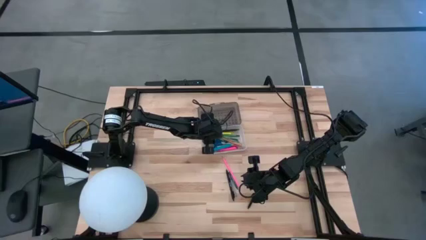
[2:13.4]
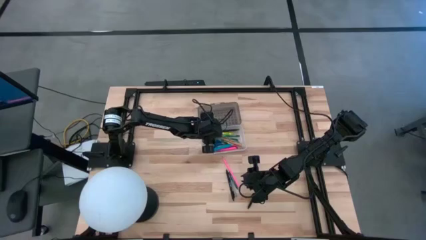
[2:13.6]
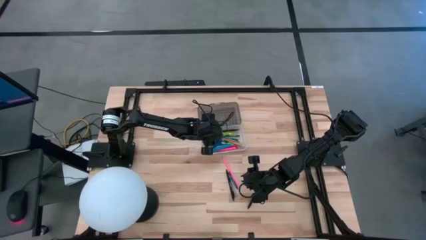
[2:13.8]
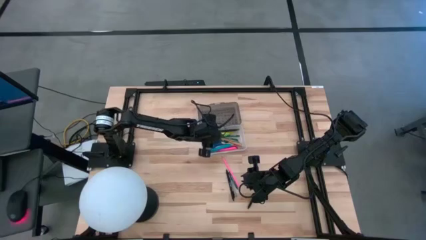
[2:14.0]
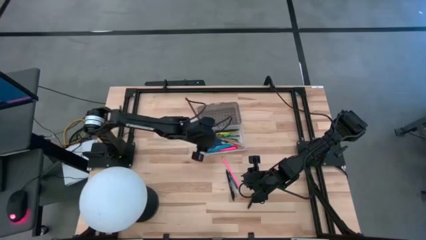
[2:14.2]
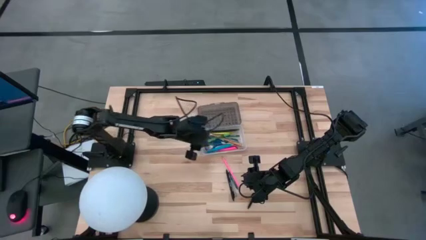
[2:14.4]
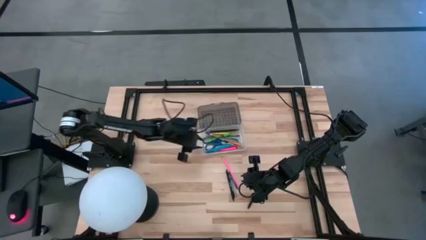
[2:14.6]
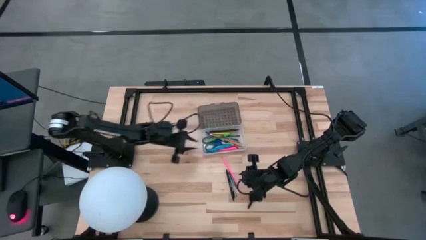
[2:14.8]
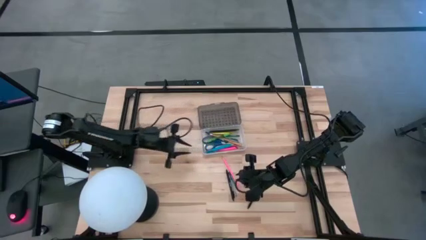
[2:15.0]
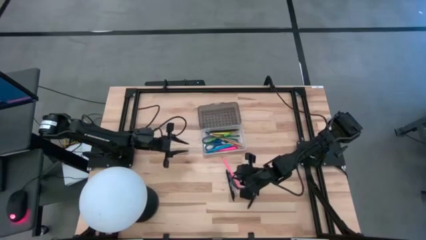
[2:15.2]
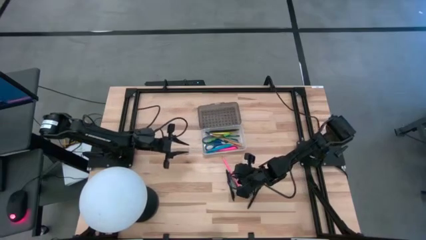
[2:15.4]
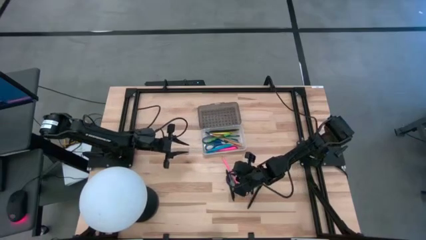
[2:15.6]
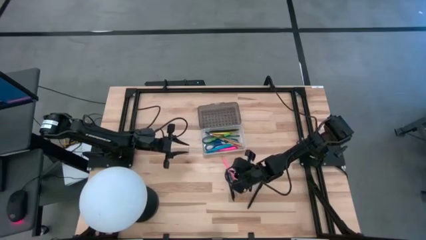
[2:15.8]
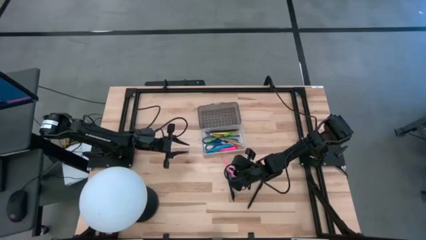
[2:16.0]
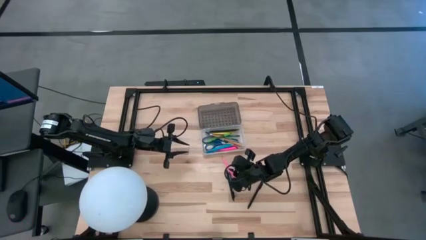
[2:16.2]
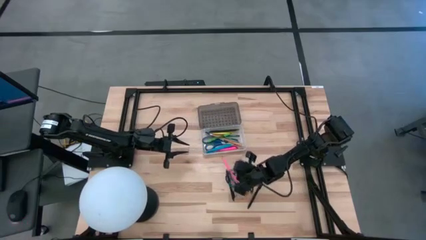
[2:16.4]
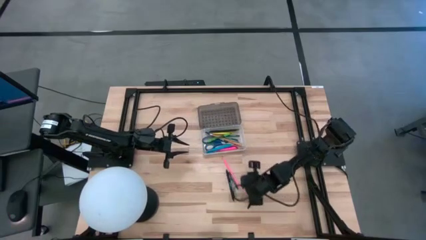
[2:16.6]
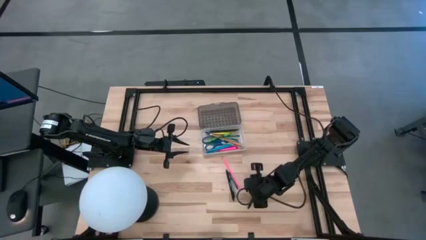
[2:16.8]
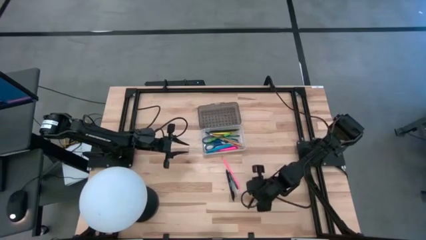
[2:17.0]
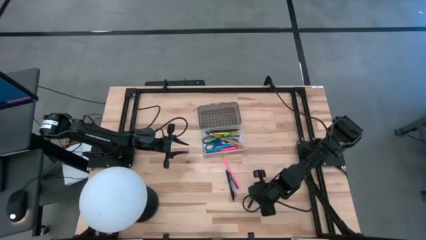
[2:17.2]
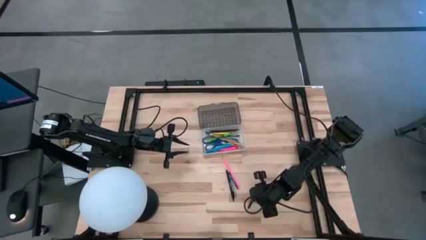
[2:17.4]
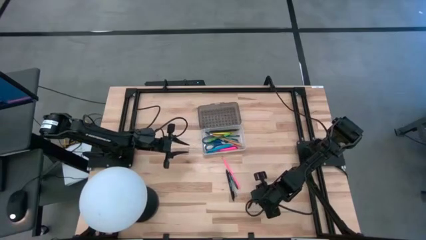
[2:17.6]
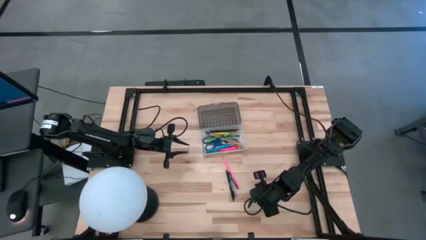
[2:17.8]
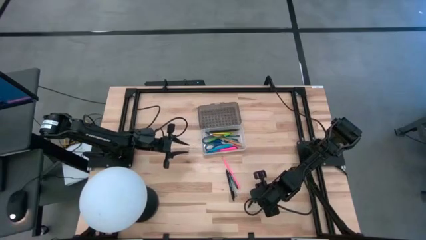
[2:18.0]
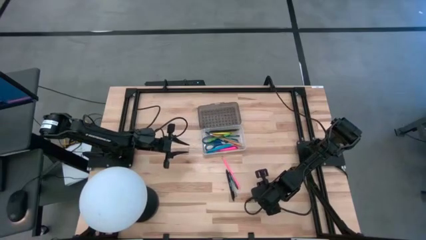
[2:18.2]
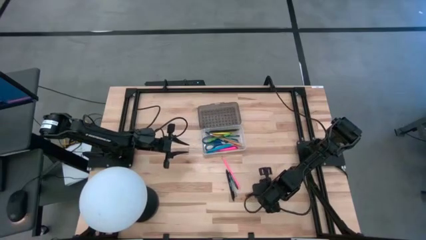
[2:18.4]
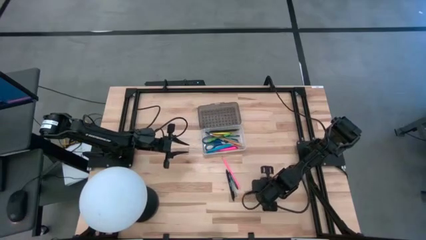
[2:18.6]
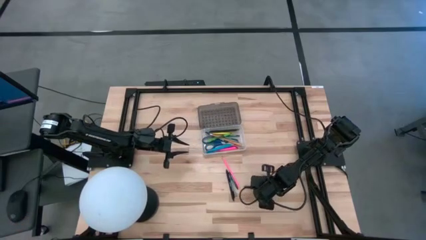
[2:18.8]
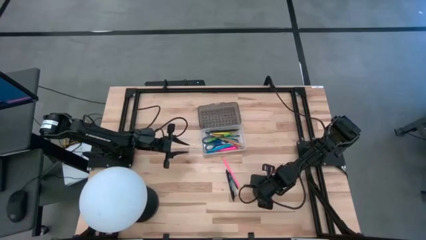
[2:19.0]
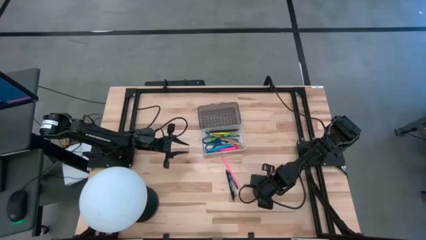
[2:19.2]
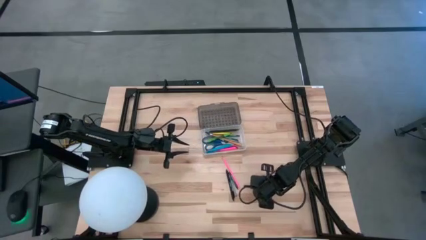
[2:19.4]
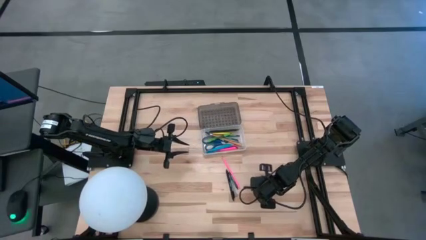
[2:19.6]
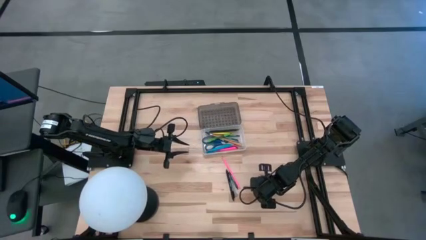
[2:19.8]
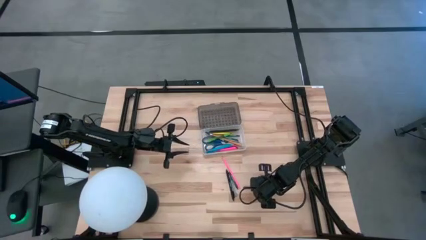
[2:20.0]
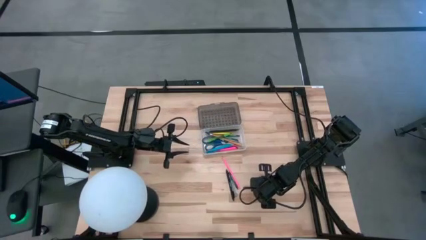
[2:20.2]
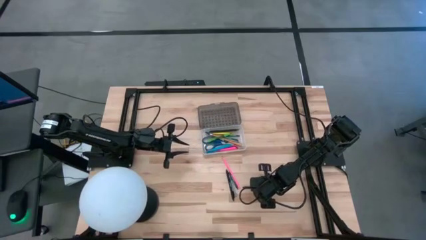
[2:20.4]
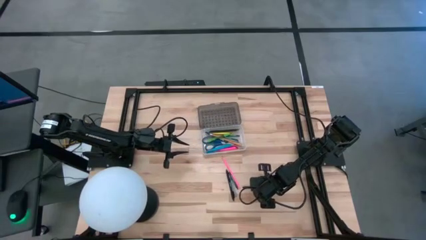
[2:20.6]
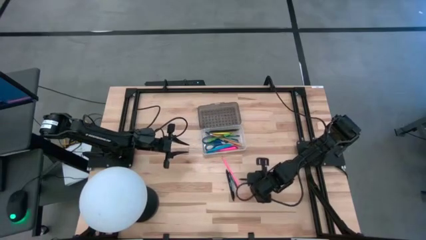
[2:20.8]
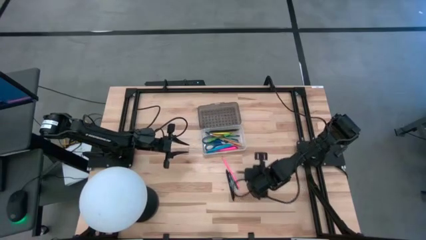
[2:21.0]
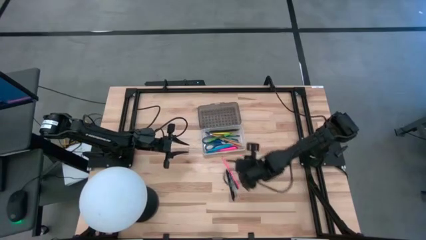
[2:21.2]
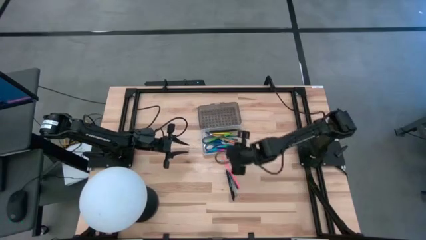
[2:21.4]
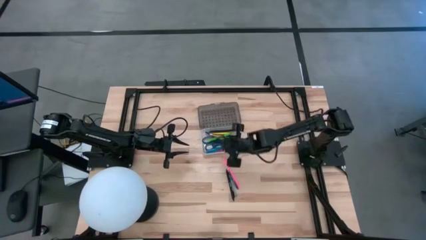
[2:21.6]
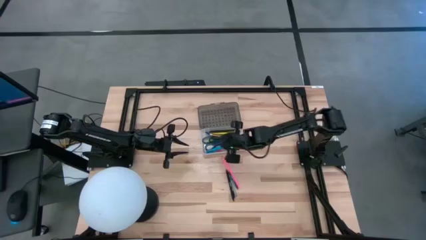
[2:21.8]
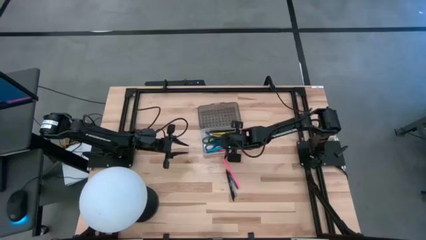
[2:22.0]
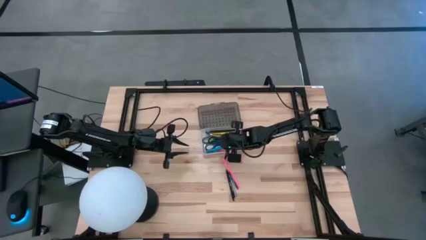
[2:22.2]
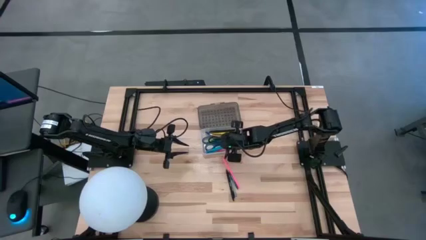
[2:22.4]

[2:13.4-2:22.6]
Task: Pick & place school supplies into a supply box
Put the black pen into the supply box

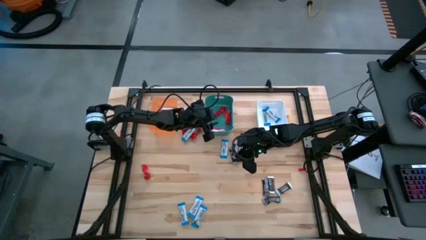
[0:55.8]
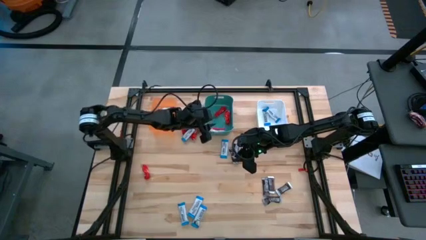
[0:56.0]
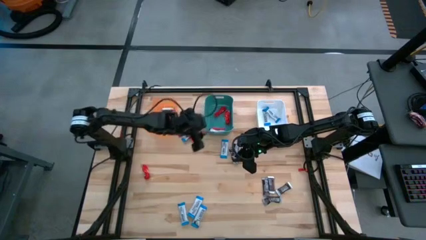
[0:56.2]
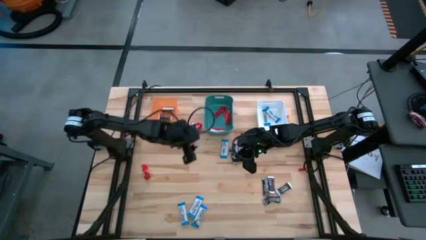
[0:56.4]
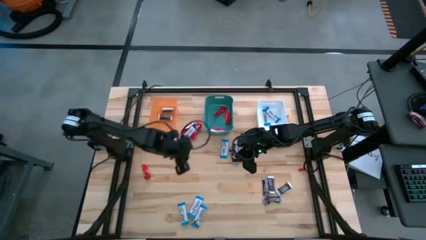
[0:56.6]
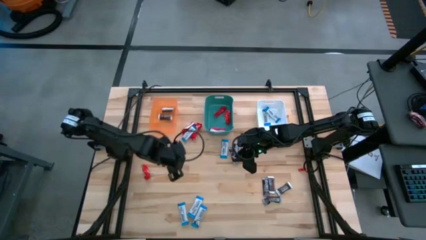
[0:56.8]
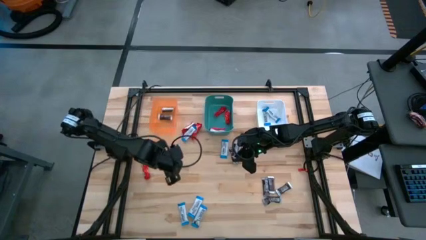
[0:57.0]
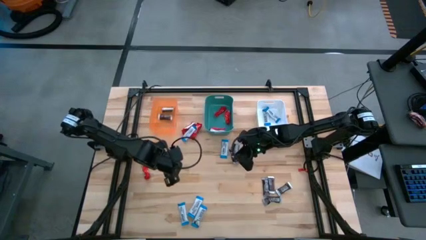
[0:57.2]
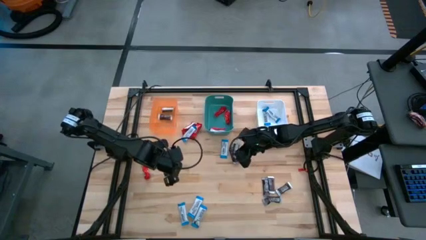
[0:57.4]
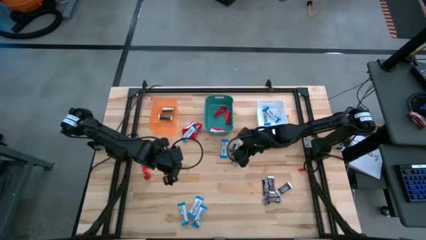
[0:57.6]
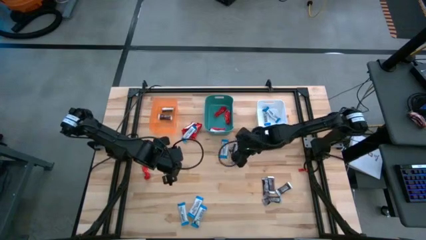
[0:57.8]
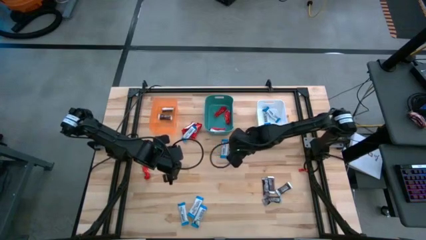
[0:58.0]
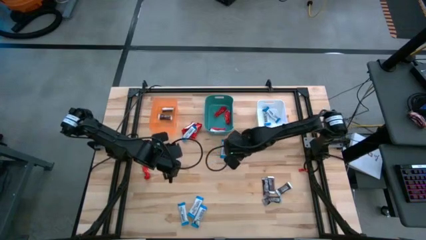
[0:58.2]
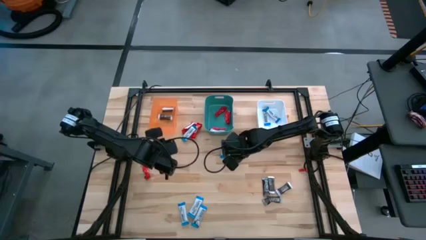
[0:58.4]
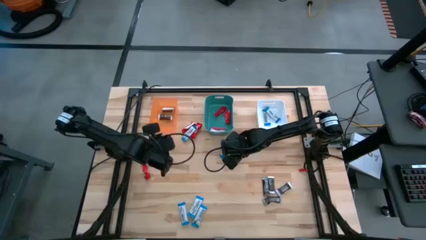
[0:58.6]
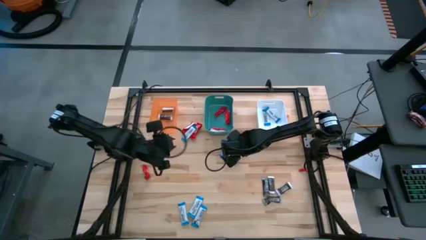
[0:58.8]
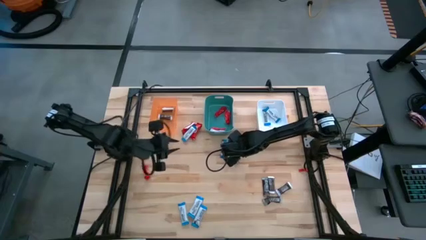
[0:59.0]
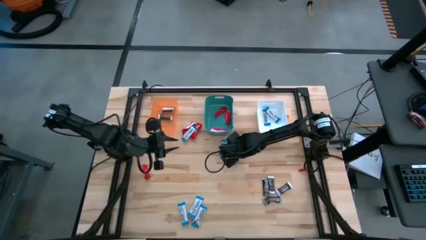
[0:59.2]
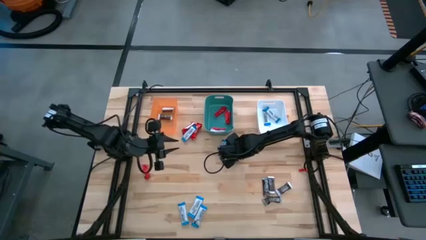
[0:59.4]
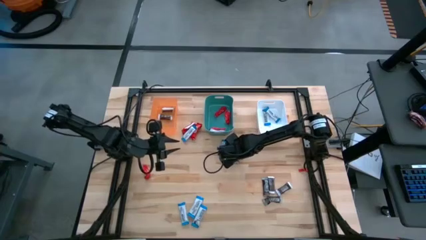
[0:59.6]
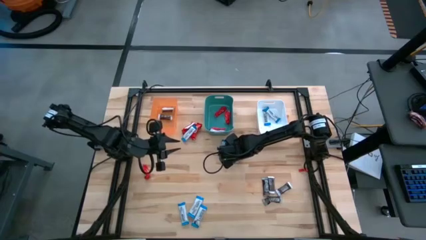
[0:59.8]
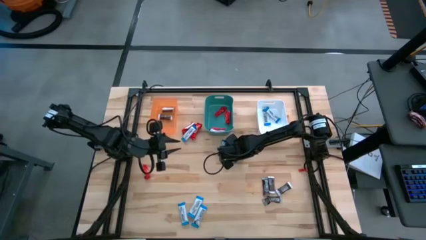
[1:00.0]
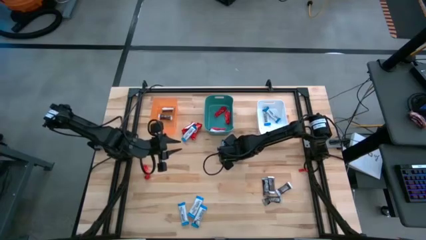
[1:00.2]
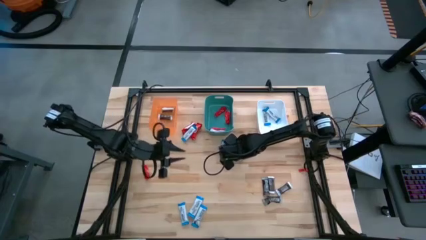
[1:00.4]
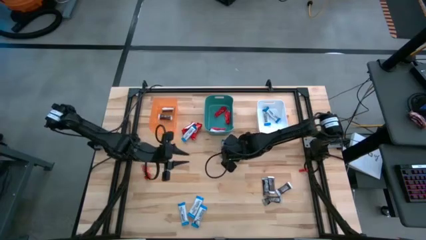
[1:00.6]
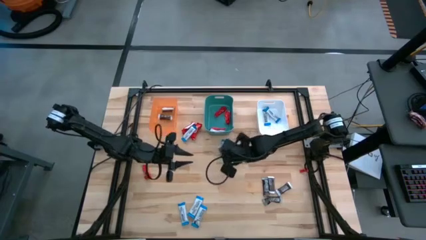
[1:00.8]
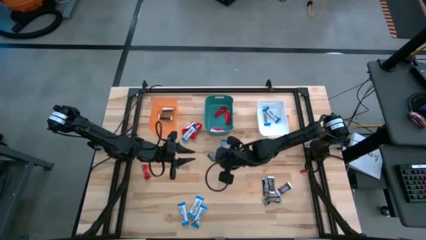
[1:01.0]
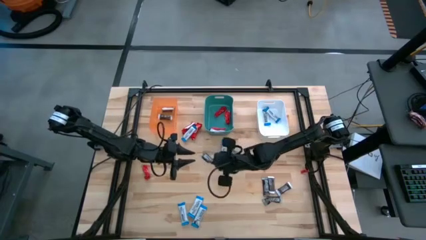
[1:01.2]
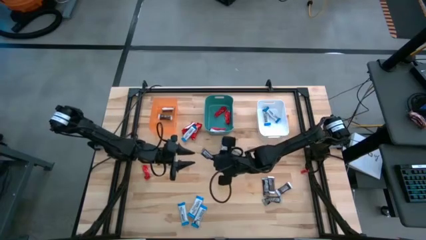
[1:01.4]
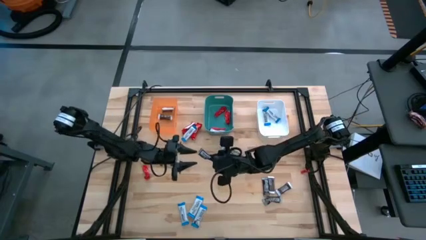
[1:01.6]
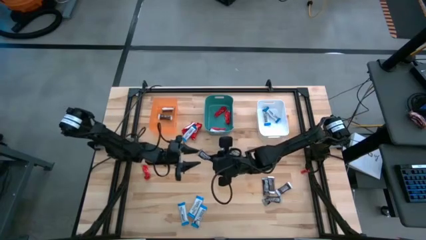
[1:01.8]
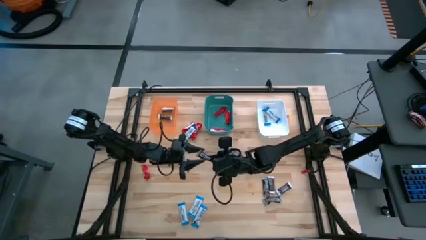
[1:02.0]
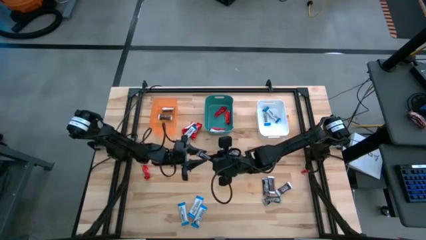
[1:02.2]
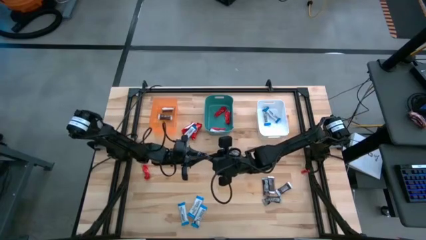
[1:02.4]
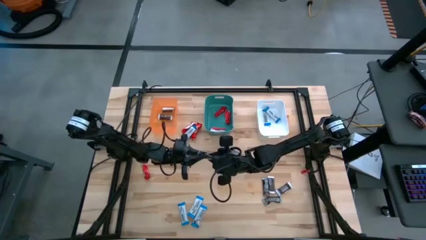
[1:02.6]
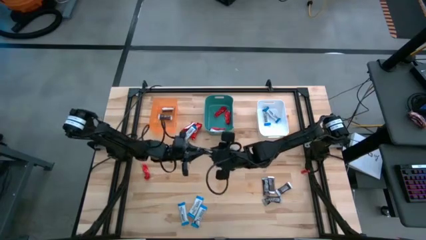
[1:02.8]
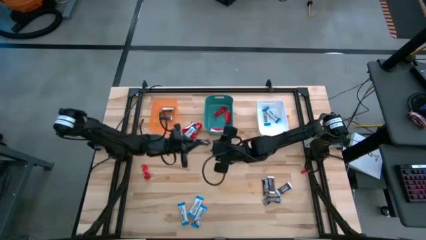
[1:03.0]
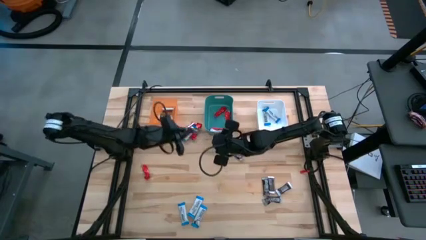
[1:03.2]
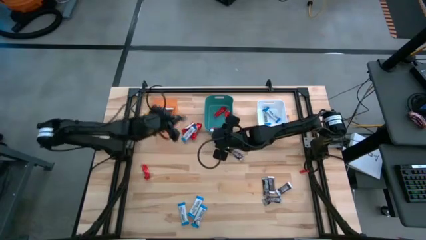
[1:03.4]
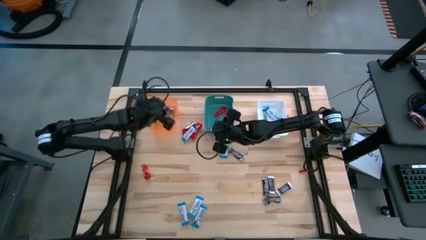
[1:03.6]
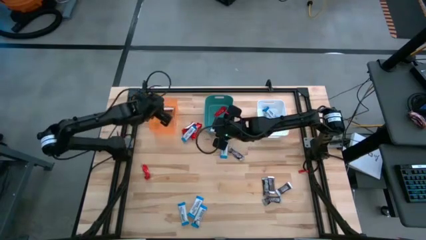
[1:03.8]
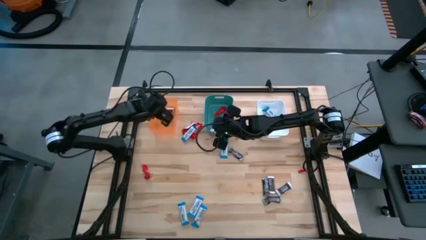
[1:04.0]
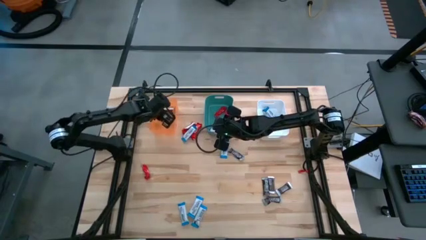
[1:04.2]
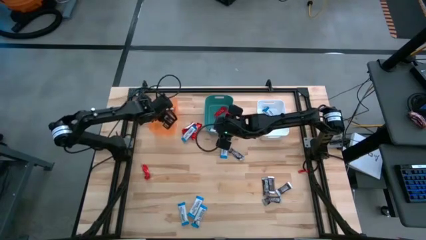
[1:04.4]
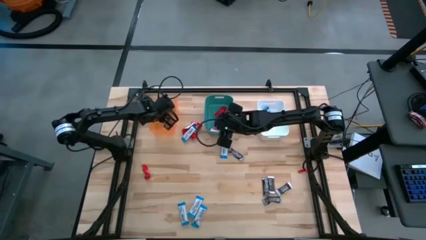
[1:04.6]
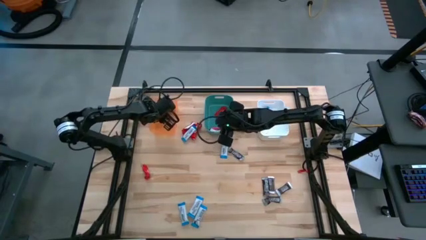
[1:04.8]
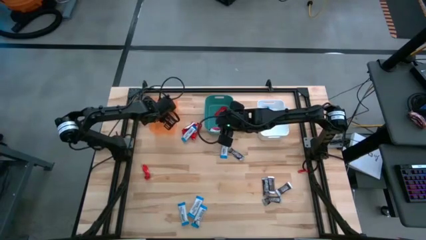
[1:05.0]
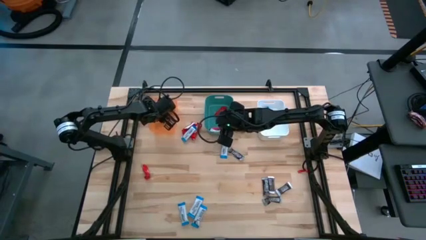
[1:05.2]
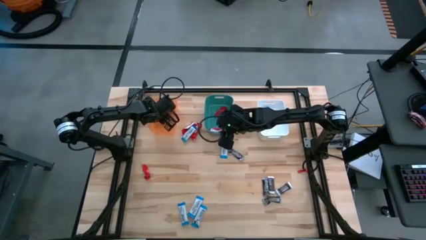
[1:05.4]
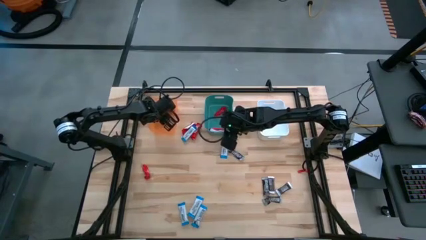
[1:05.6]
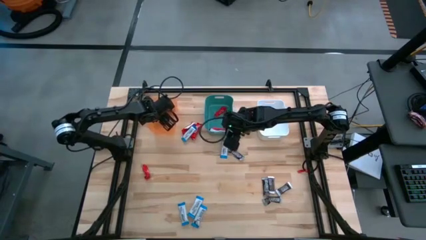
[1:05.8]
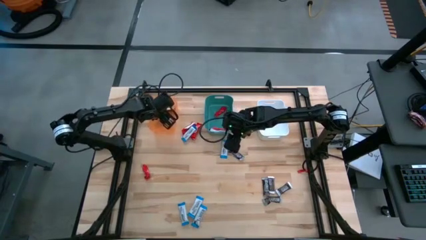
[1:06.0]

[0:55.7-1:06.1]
Task: Organize candy in baskets
Put the black chocolate bar into the orange bin
